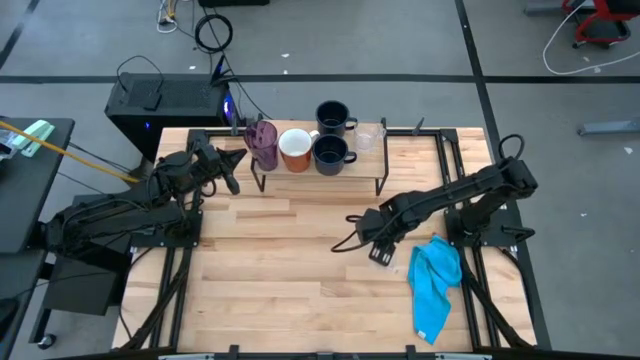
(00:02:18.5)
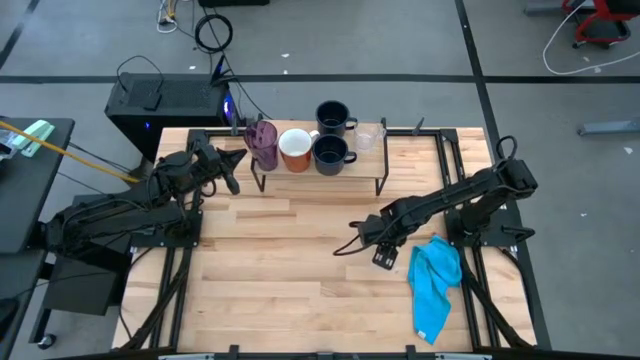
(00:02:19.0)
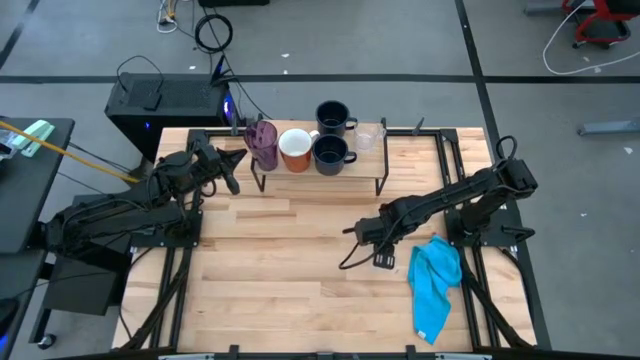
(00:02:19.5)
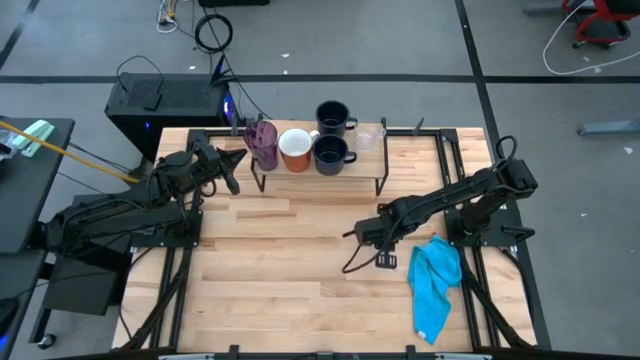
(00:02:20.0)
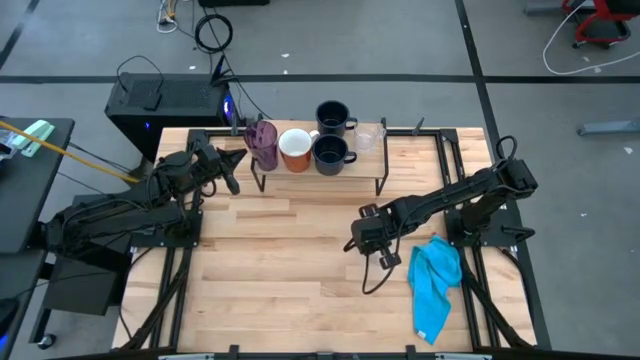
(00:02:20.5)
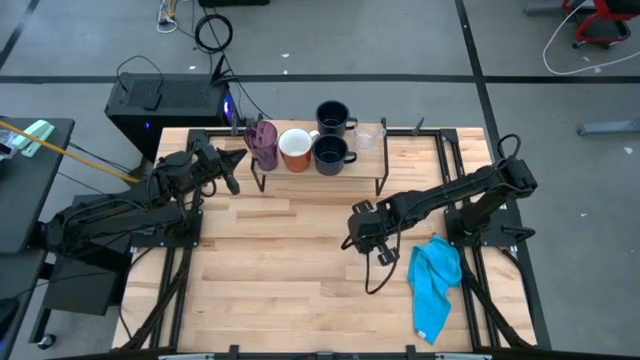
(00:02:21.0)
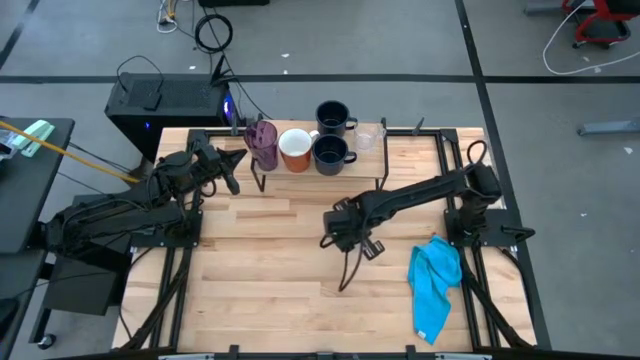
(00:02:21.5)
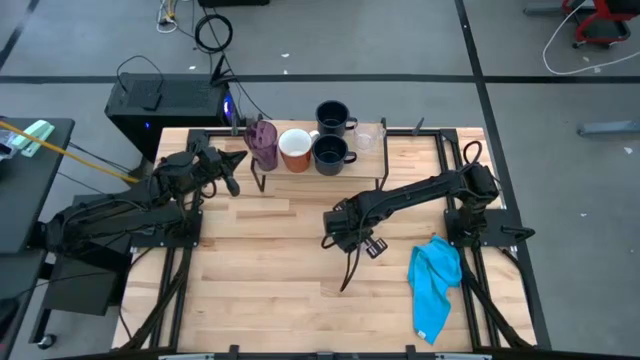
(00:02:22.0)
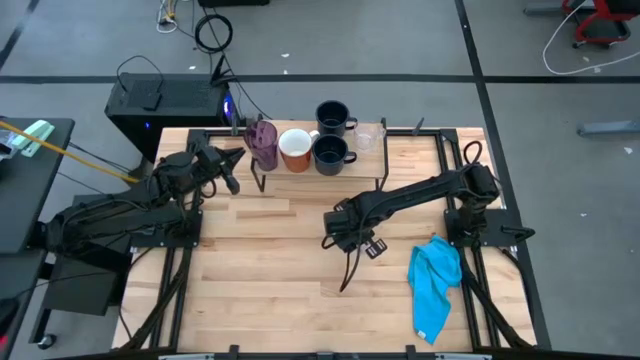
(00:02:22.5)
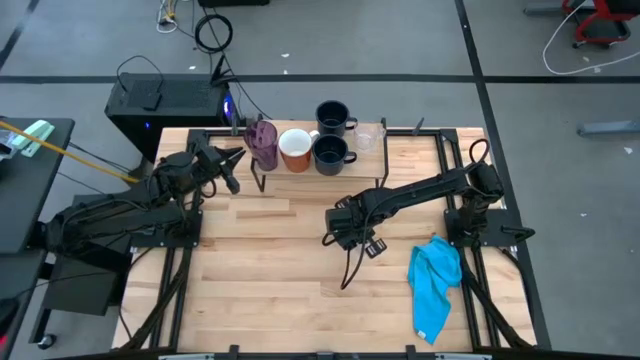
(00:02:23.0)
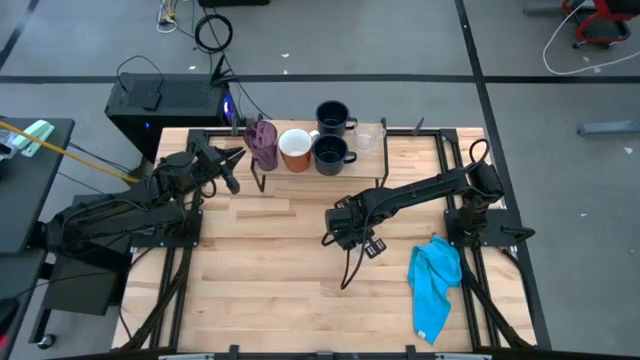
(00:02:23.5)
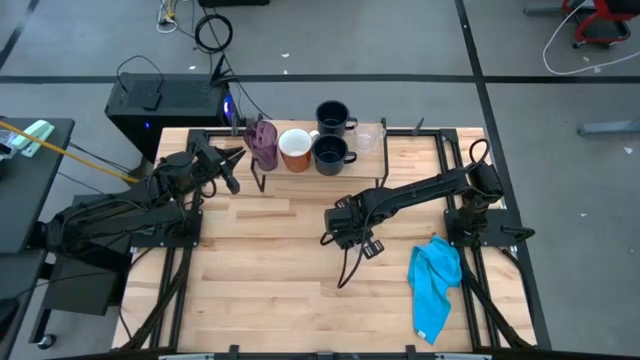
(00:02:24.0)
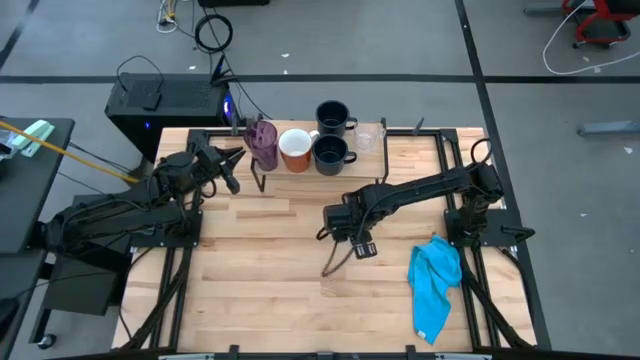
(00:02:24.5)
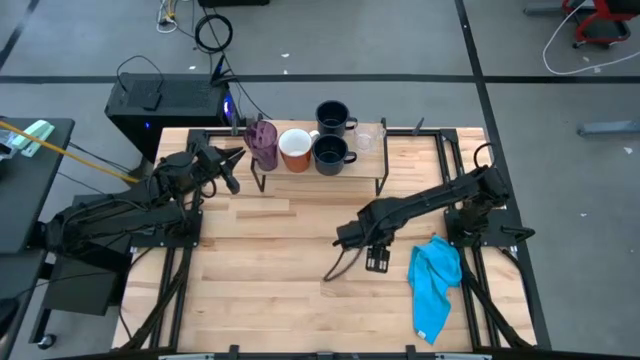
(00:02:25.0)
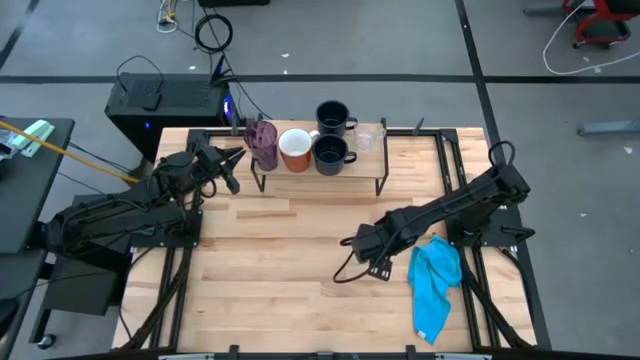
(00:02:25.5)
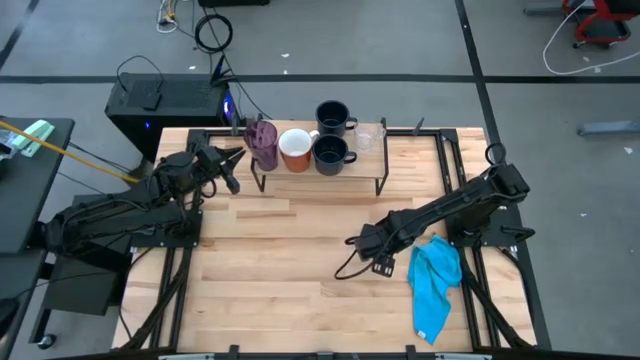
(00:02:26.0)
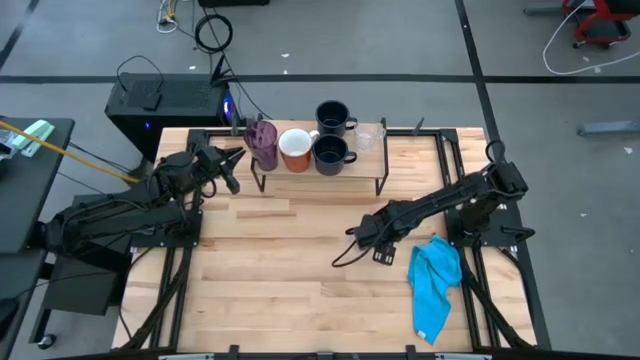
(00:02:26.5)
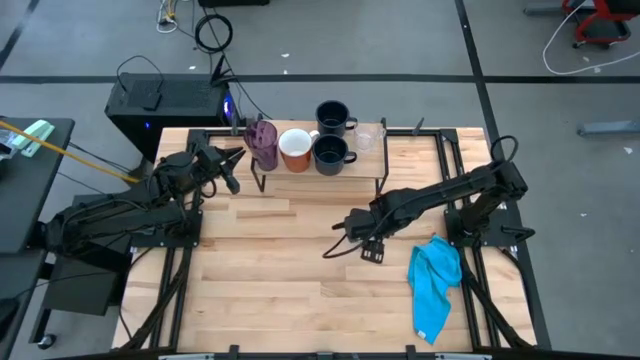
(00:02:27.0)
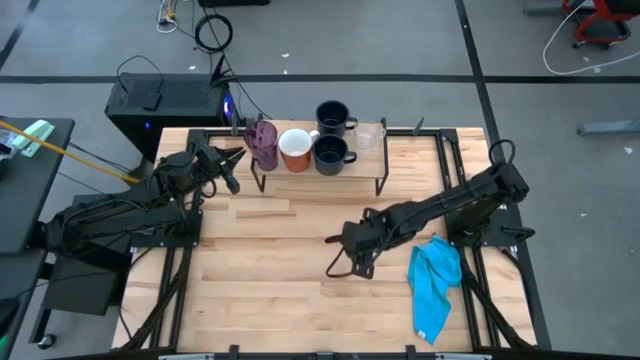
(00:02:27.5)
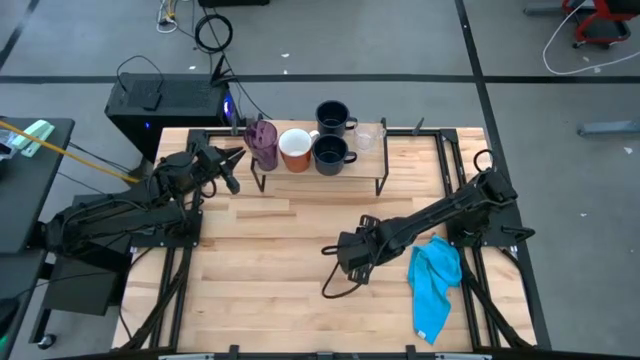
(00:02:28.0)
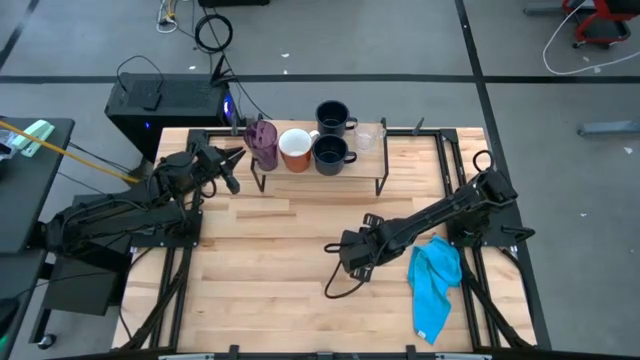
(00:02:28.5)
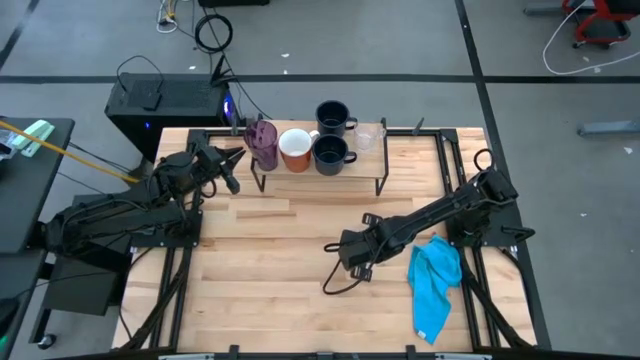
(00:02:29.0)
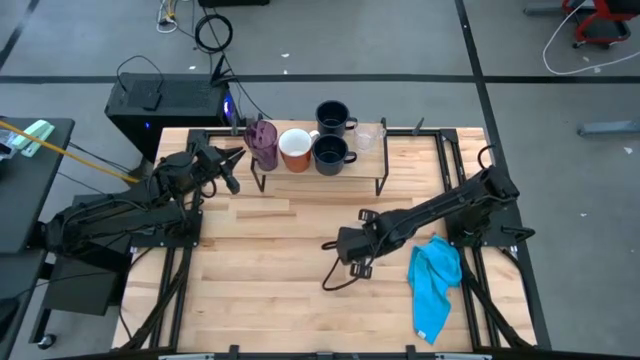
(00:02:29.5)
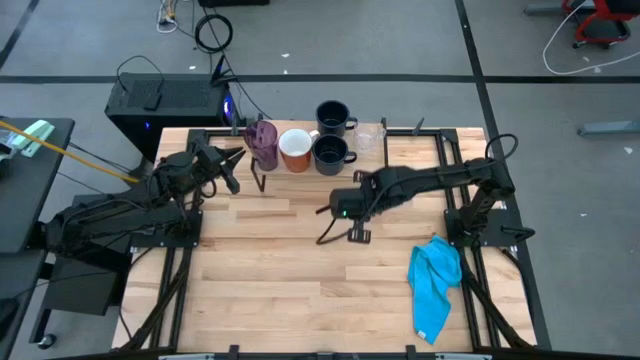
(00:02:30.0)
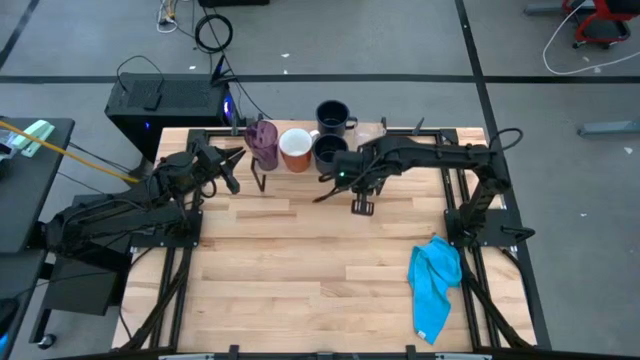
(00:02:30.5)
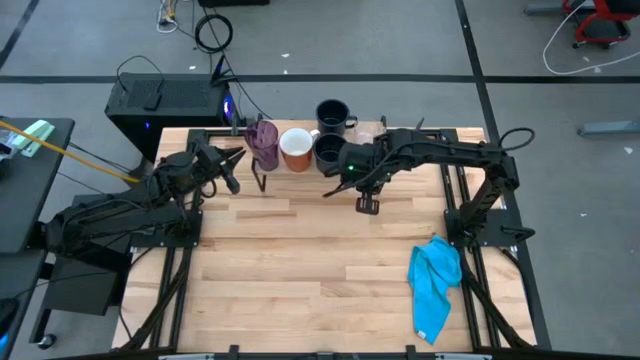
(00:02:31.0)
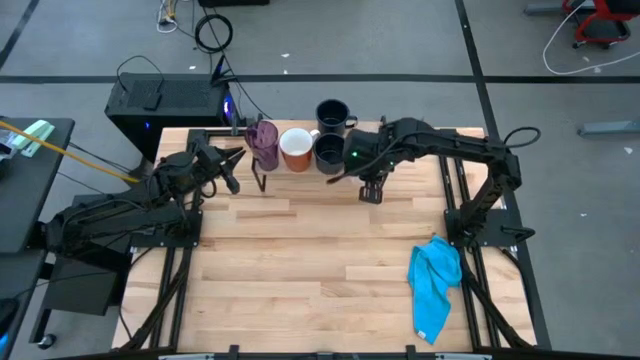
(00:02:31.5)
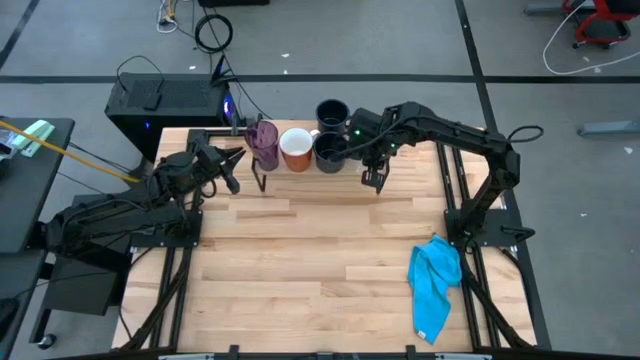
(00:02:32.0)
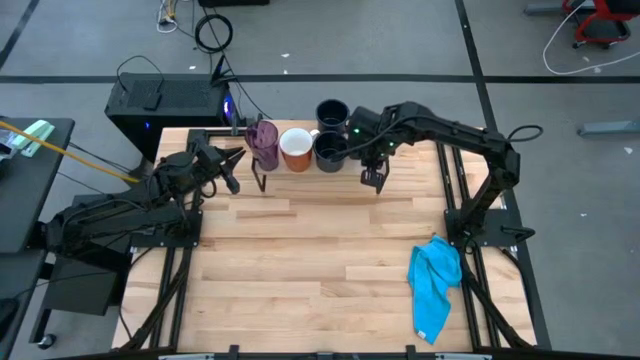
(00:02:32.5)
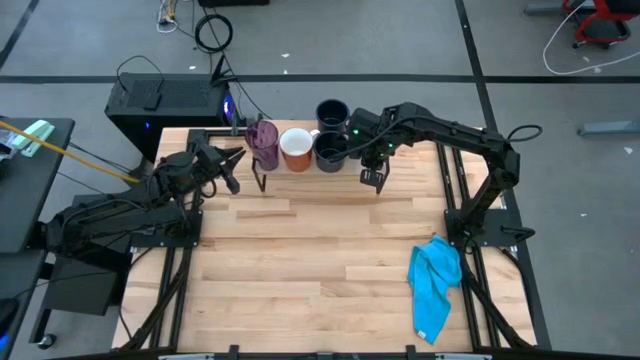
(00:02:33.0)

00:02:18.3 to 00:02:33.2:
Task: Stack small to large cups/mugs on shelf
Align the transparent mug with the other transparent mug on the shelf

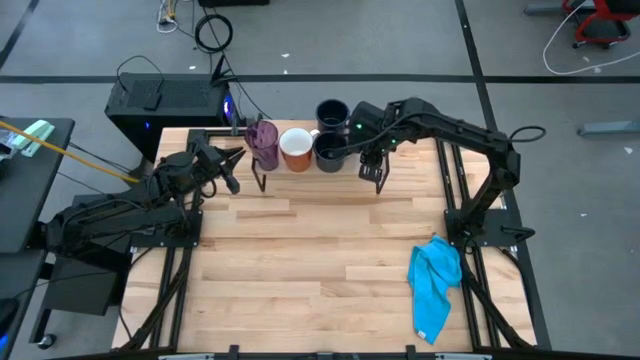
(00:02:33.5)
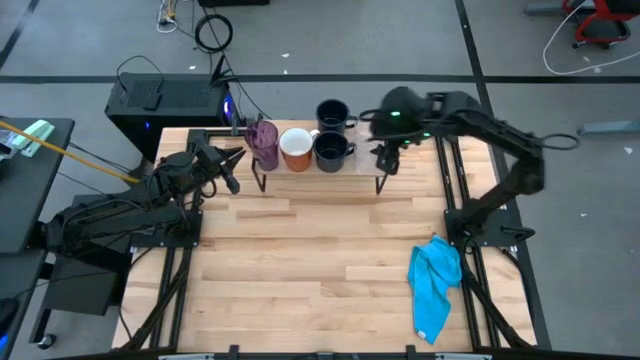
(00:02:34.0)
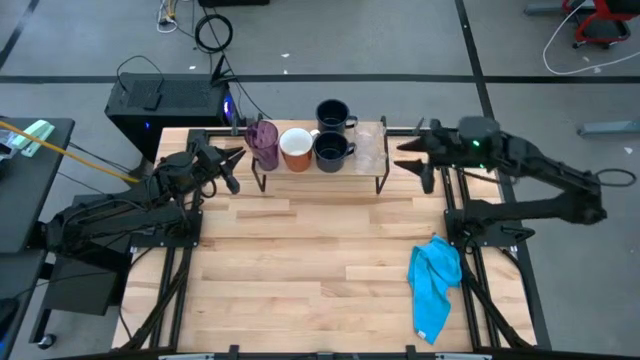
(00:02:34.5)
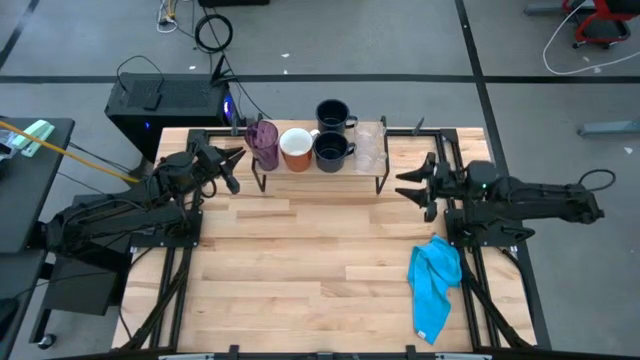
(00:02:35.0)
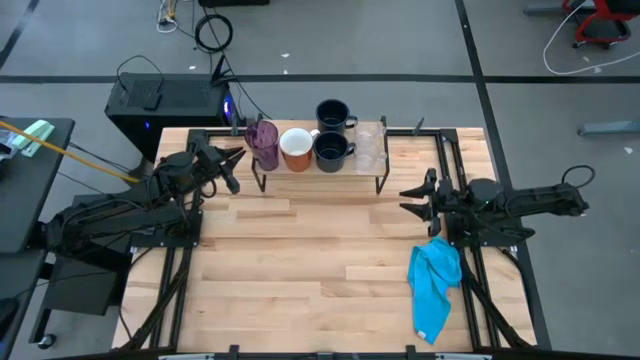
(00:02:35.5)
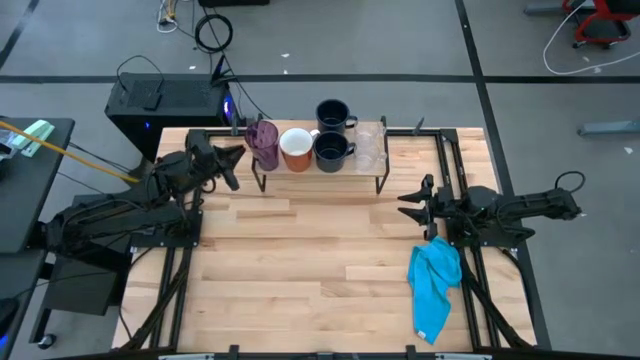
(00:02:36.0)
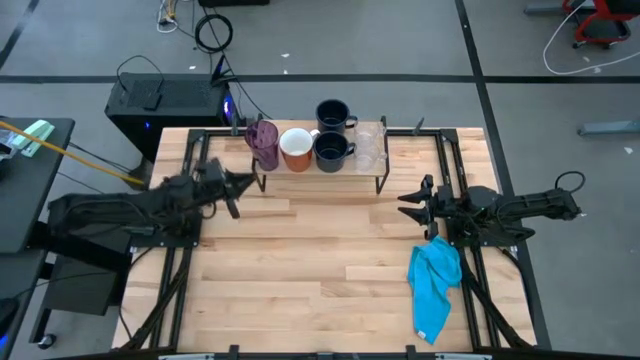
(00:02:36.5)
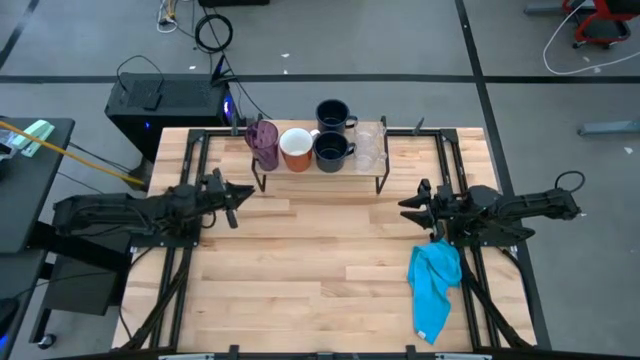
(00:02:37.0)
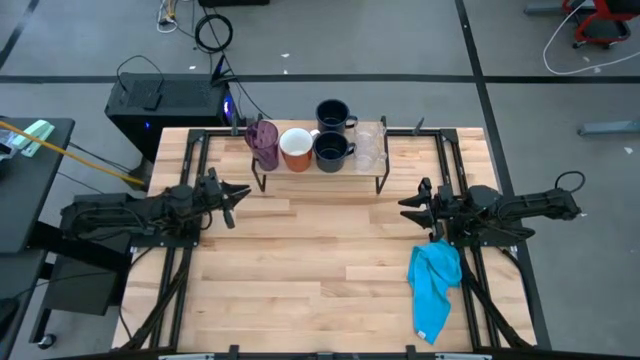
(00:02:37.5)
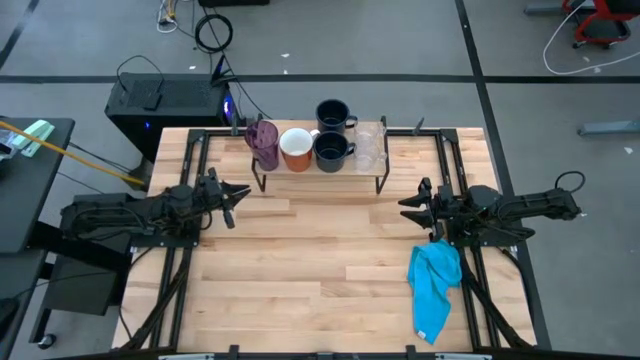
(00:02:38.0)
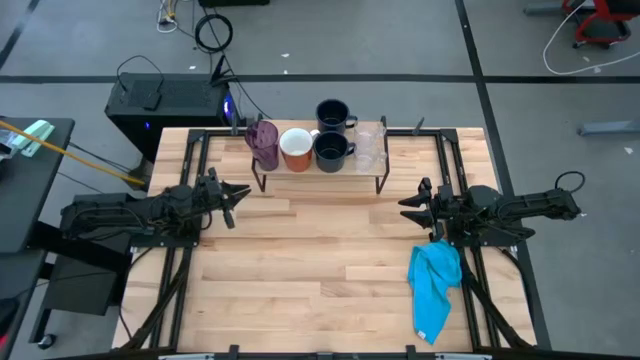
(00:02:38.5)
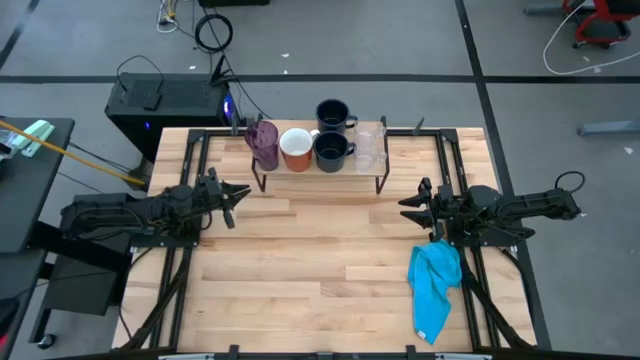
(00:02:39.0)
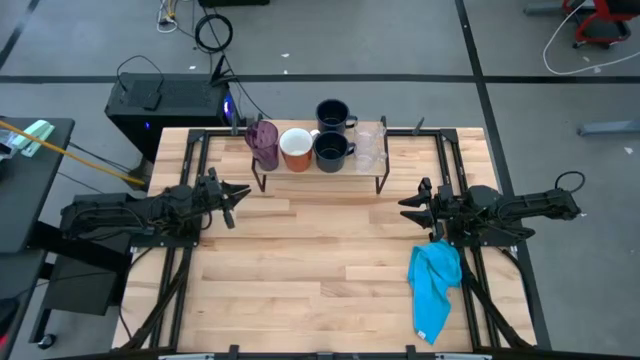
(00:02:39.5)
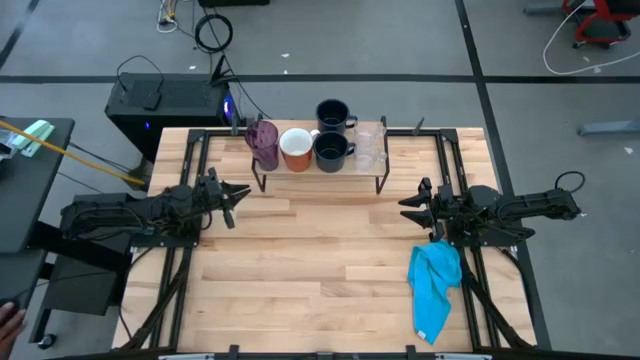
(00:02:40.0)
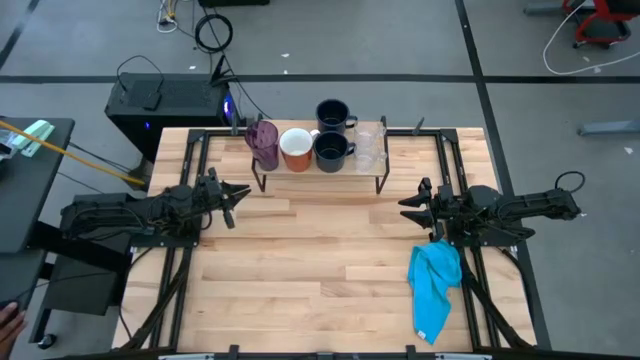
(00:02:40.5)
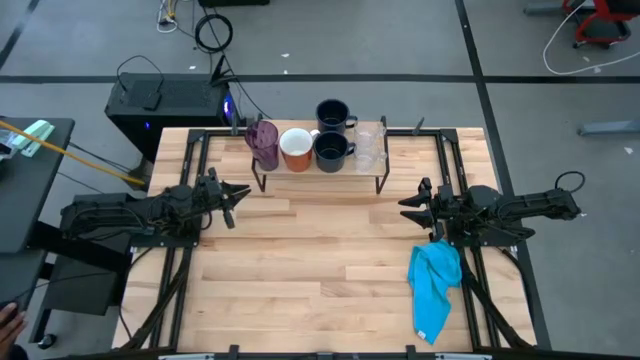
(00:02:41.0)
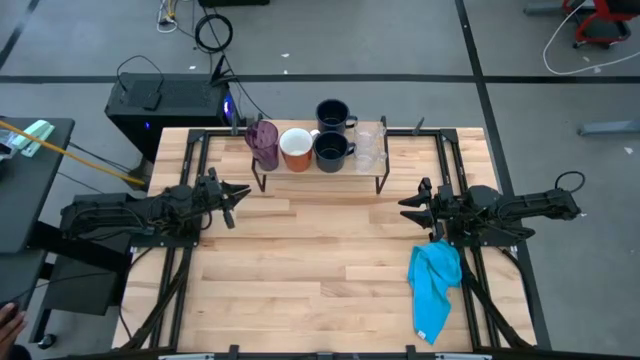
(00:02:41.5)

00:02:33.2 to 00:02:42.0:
Return to Home Position
